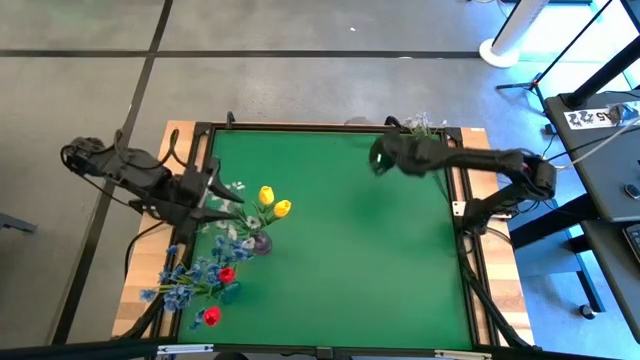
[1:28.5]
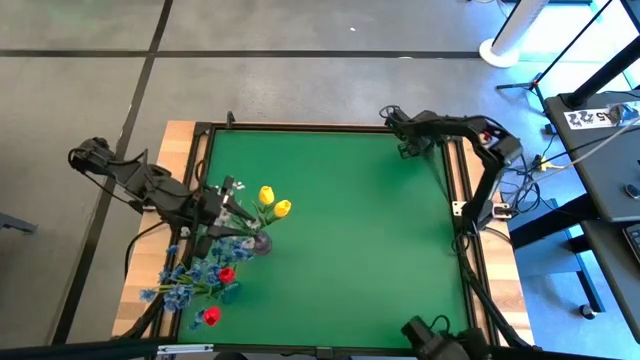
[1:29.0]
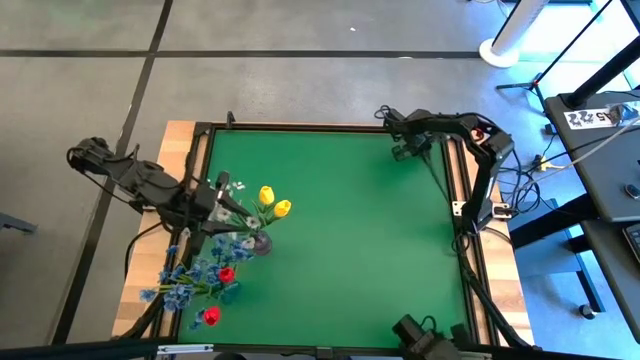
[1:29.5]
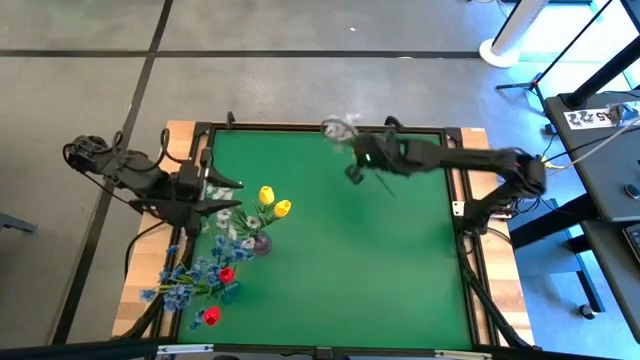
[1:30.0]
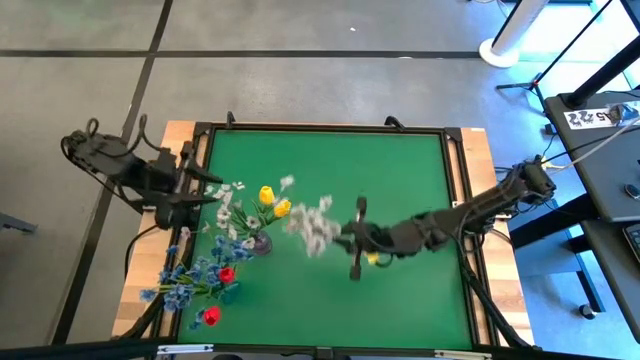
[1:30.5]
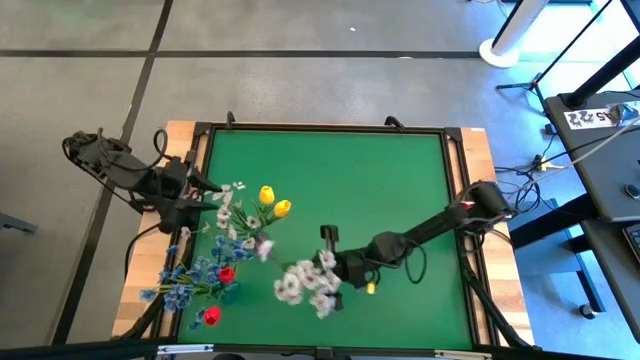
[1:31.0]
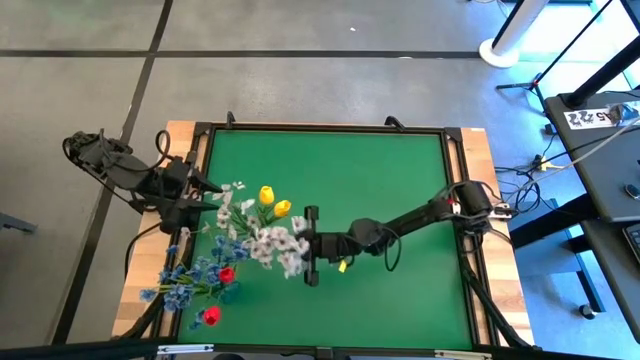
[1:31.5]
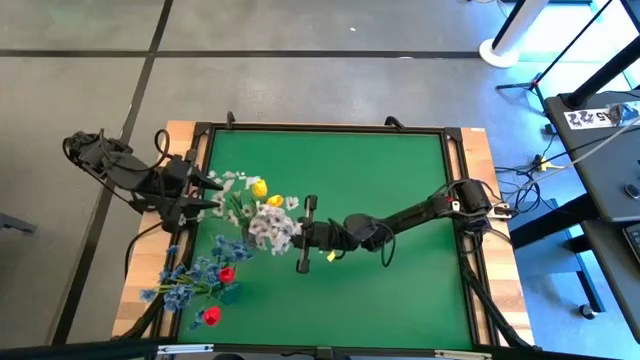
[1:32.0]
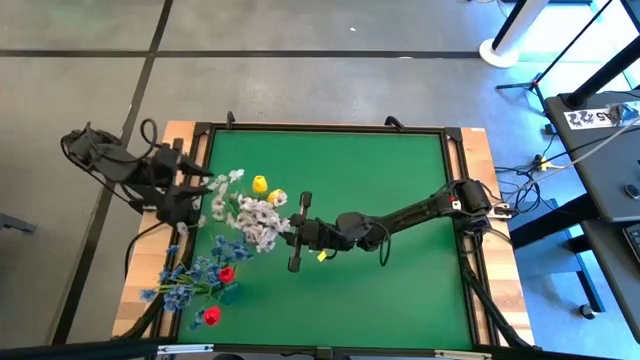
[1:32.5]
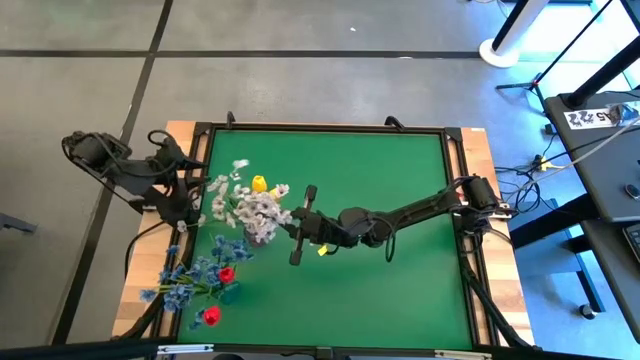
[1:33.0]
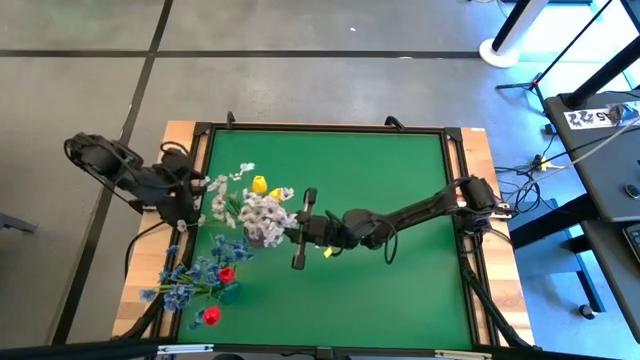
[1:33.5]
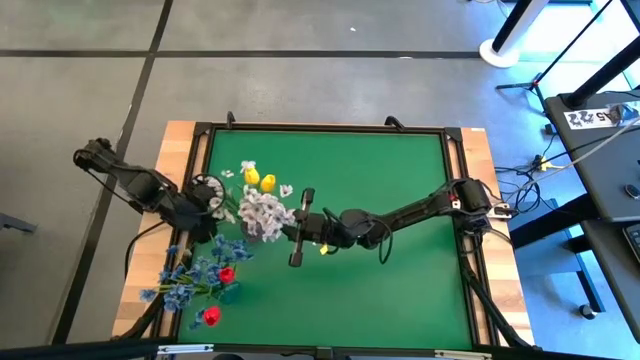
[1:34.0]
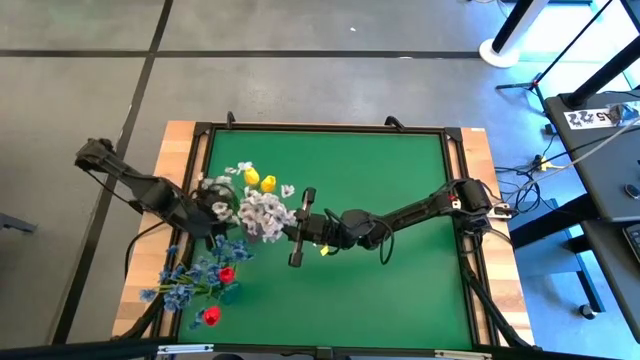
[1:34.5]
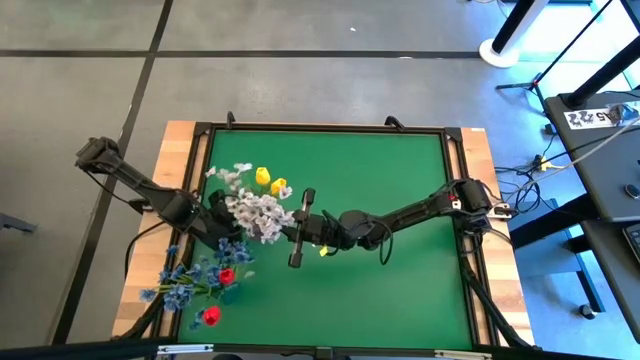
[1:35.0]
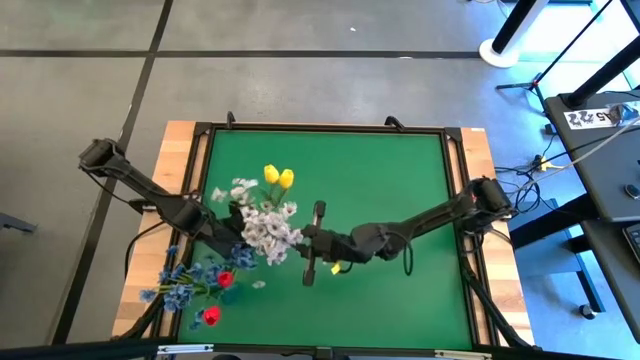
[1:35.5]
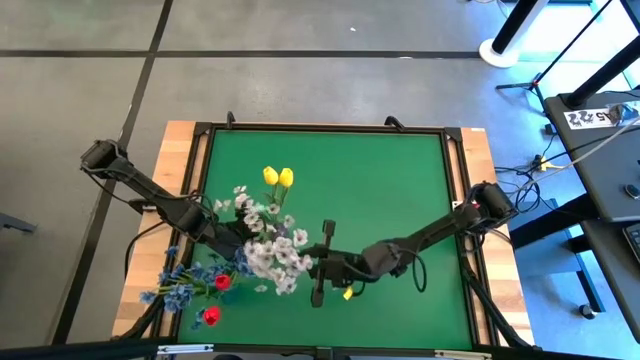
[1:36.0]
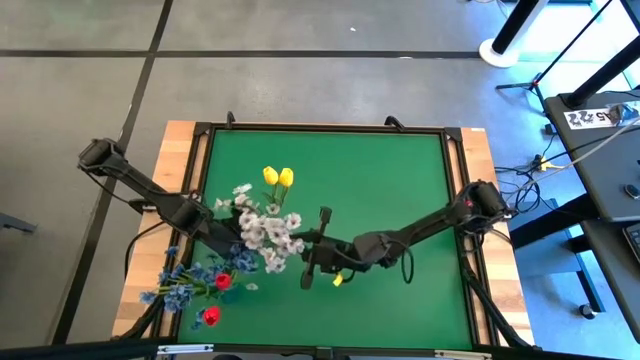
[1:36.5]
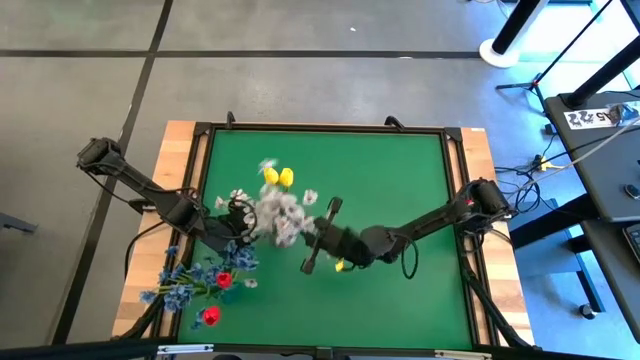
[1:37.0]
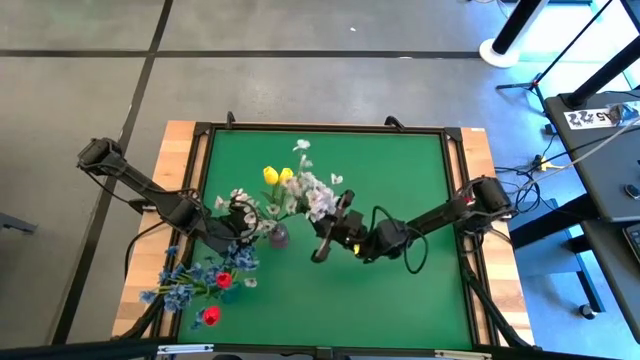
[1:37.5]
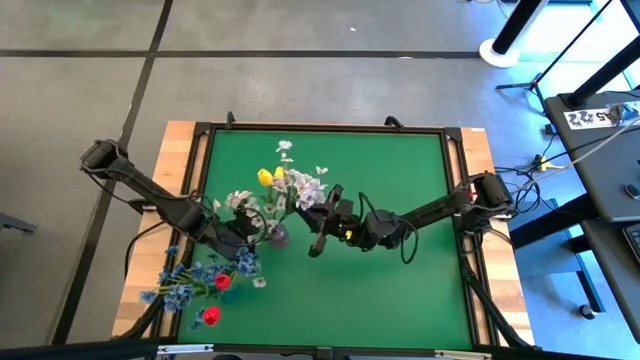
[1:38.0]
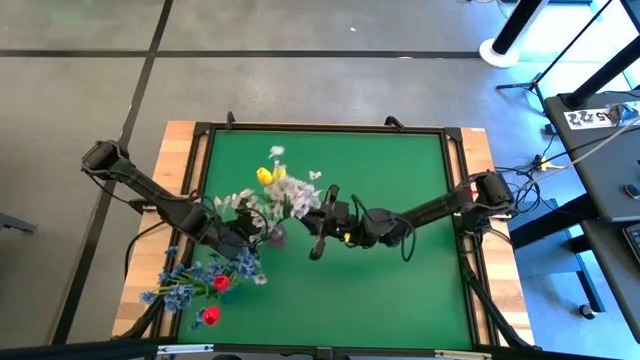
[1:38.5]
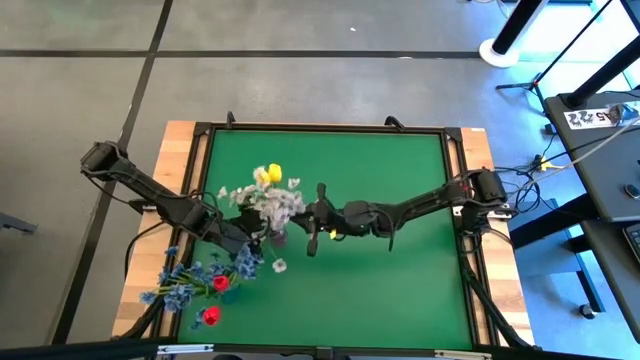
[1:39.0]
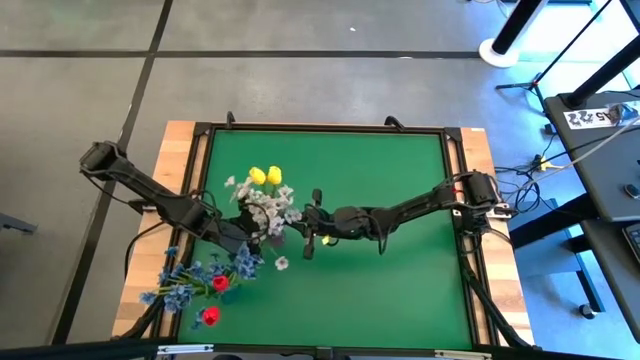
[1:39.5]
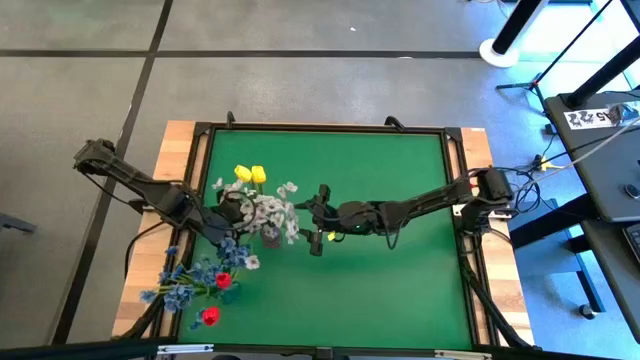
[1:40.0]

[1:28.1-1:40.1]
Task: Sort flowers into vase by color
Put the white flowers into the violet vase

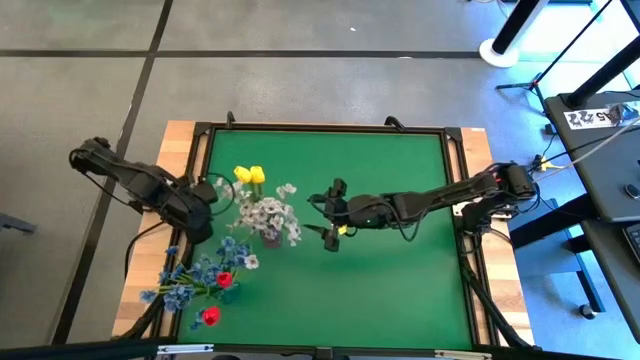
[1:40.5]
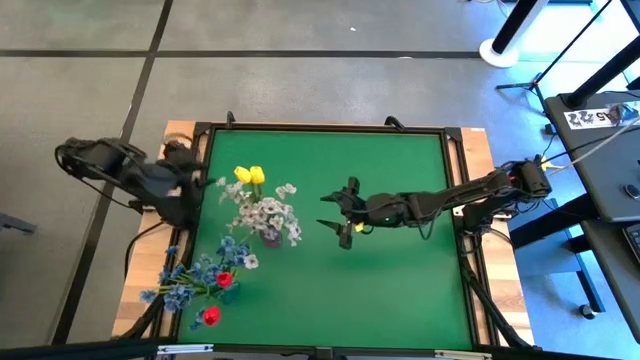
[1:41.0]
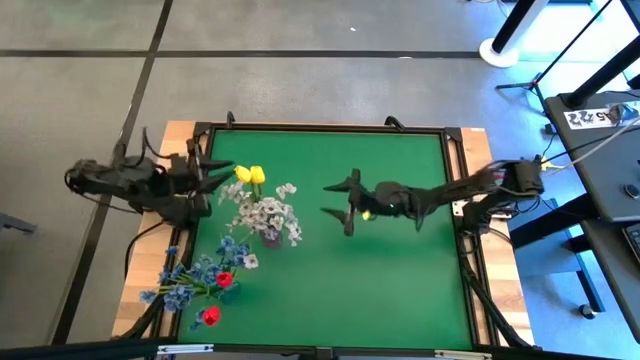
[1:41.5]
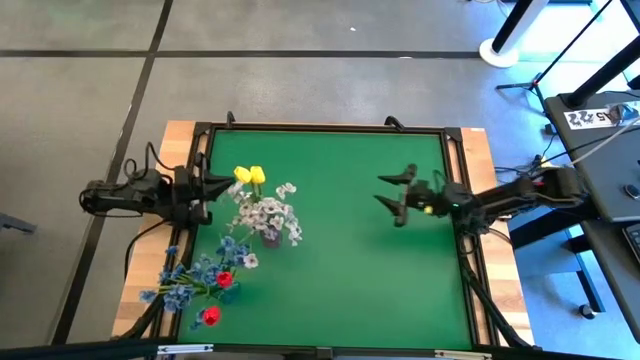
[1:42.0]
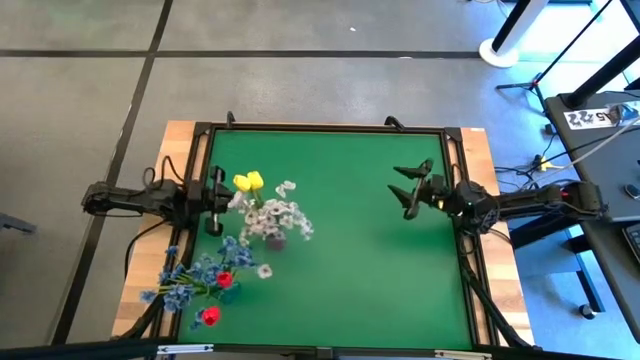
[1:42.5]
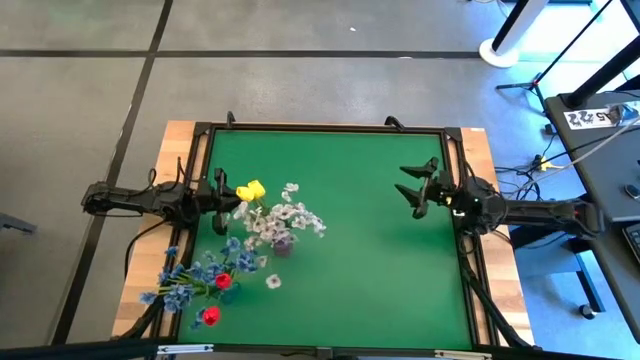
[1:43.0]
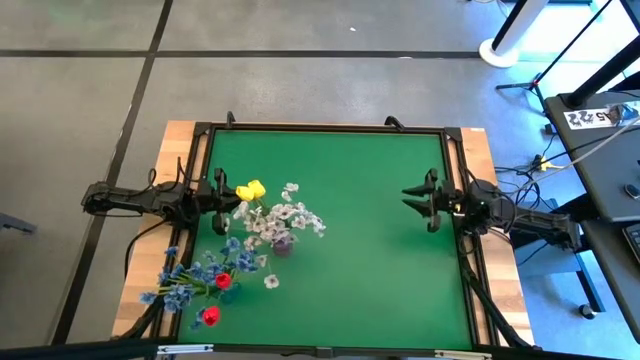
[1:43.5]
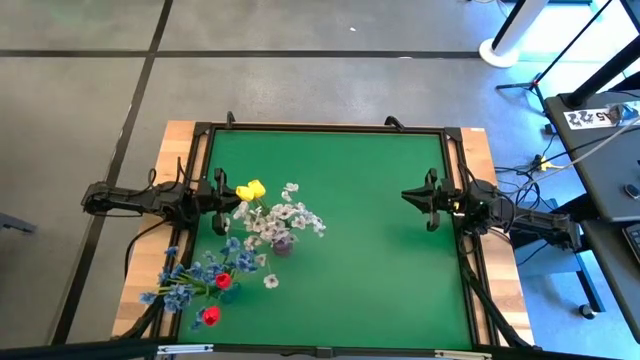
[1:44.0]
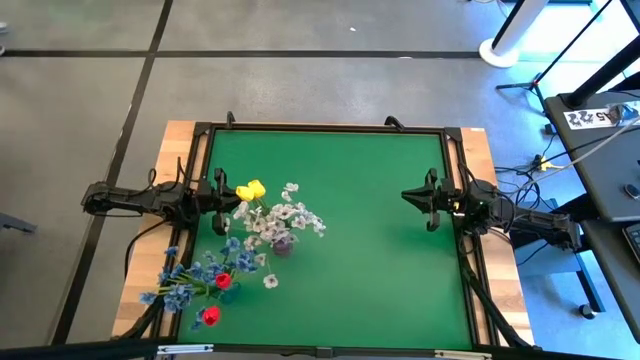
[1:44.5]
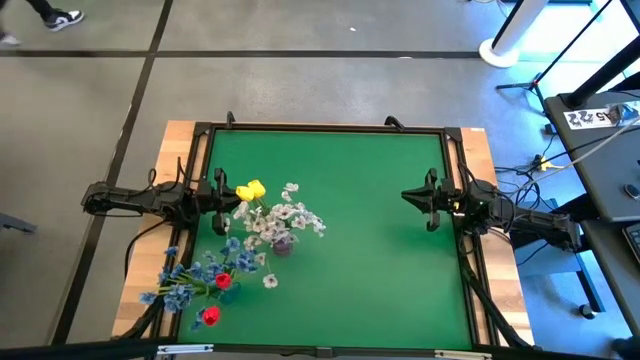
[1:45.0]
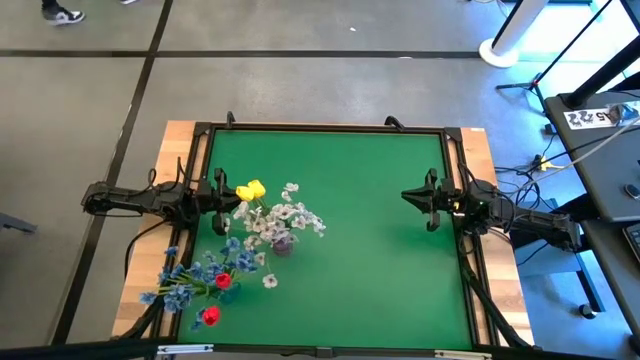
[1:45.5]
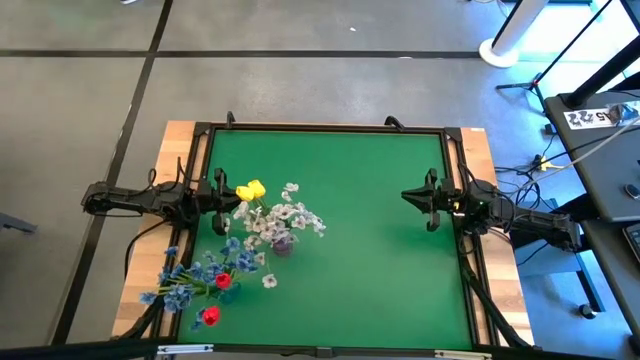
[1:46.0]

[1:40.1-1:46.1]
Return to Home Position

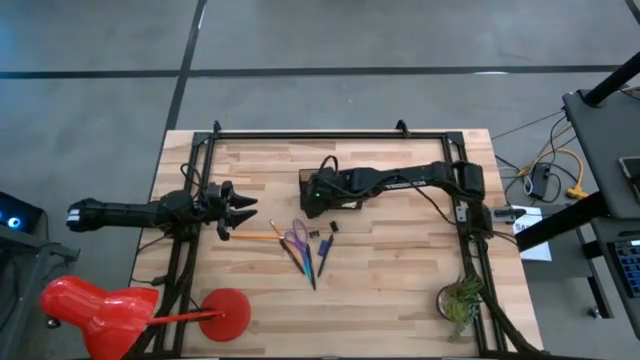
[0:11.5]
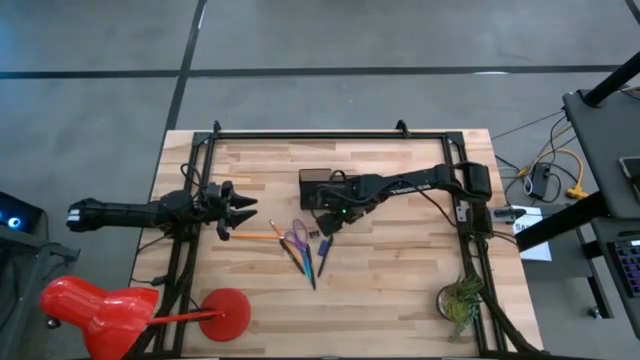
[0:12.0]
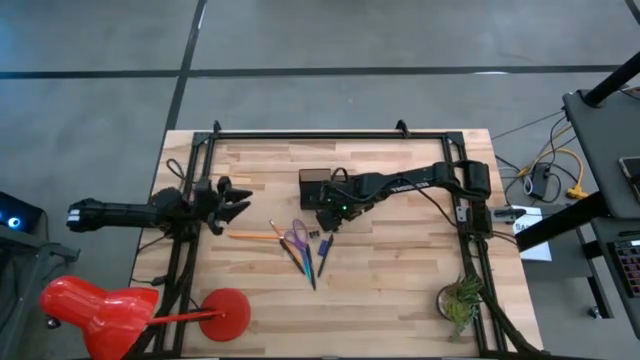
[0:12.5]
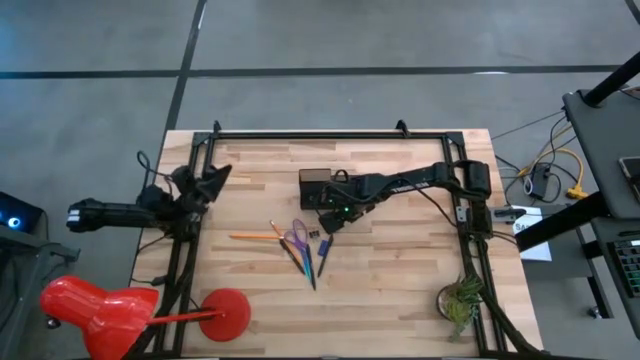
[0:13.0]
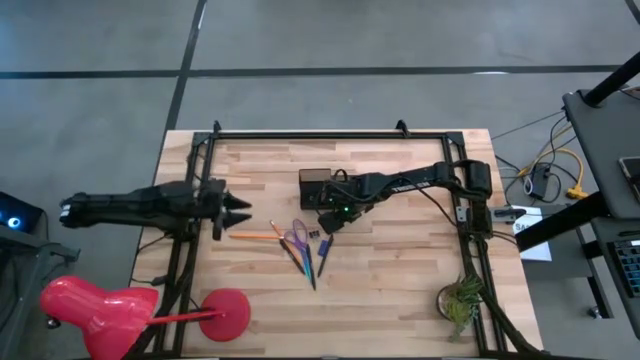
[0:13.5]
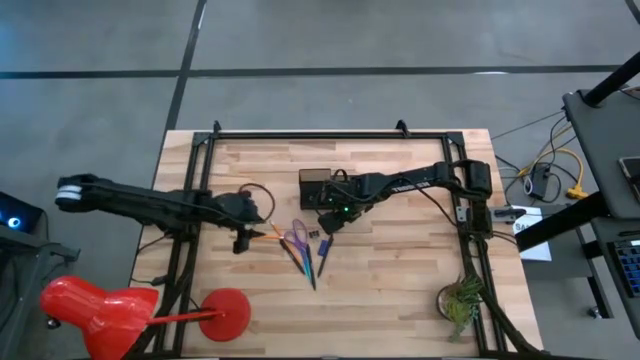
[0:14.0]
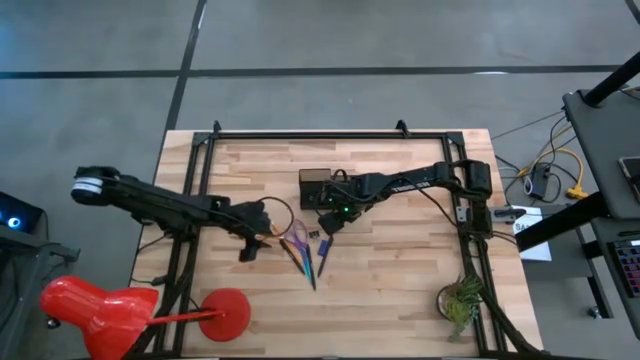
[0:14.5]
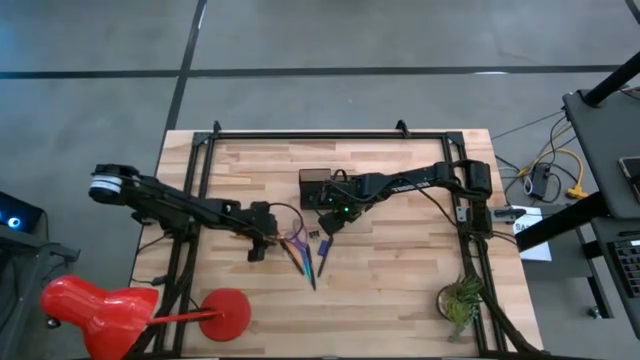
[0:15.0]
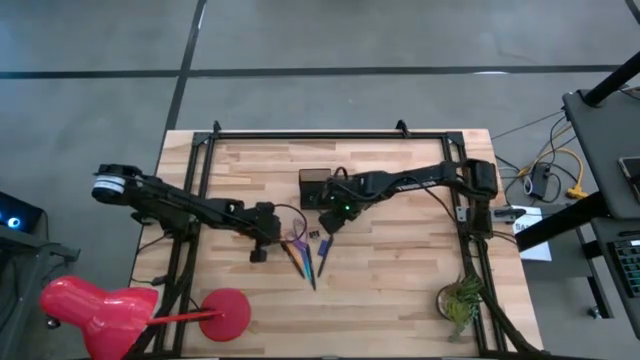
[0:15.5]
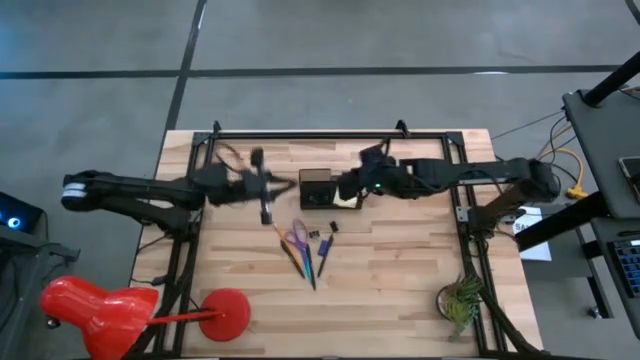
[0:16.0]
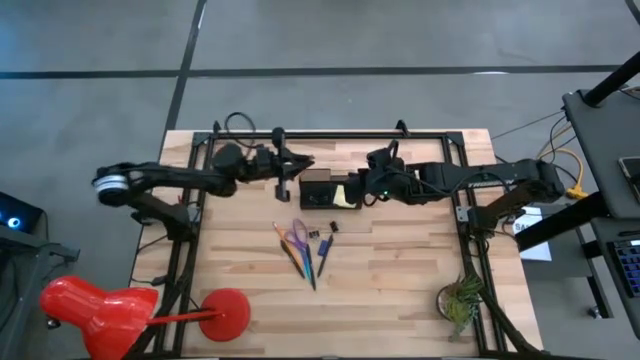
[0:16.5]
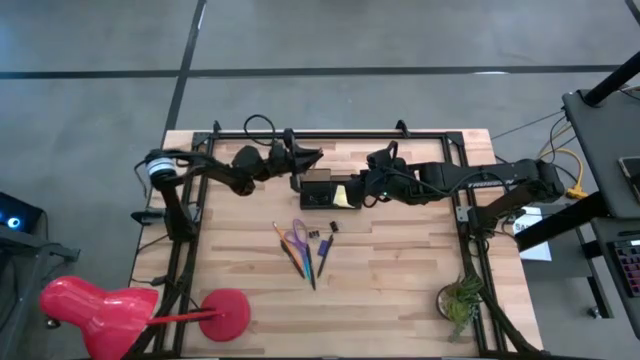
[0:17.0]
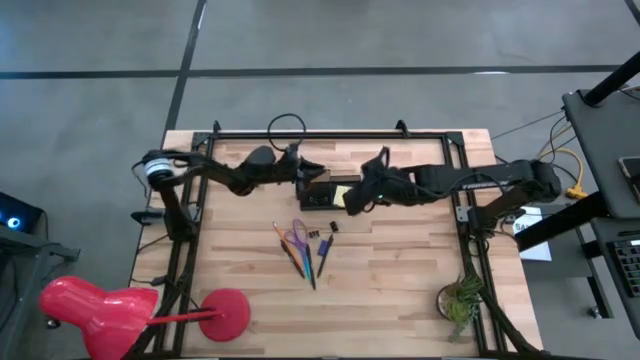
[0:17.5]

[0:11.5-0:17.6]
Task: Pick and place office supplies into organizer
Put the left yellow pencil into the black desk organizer
